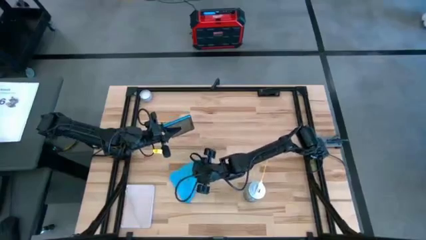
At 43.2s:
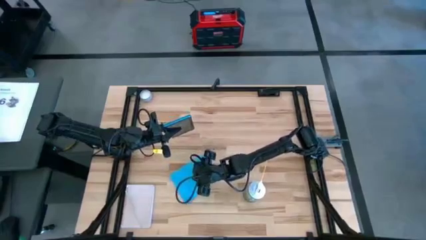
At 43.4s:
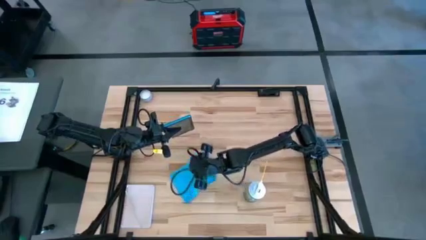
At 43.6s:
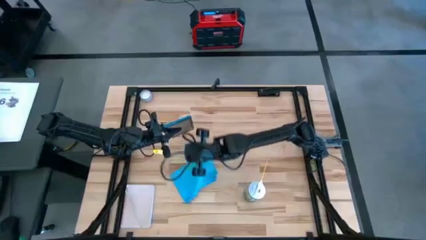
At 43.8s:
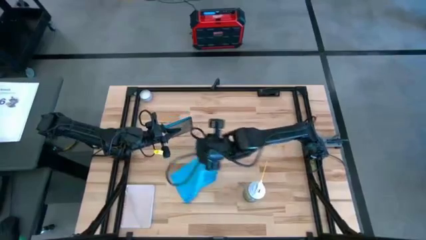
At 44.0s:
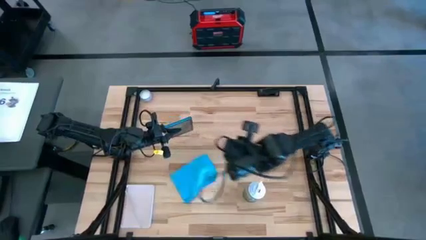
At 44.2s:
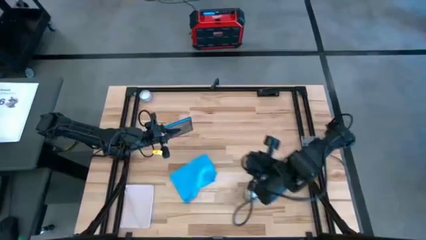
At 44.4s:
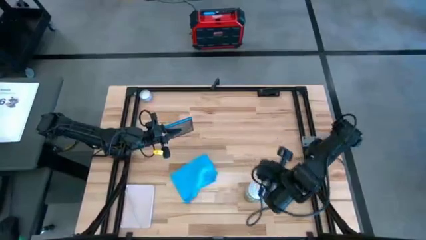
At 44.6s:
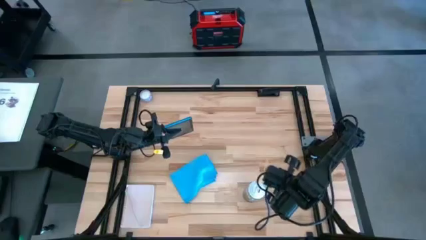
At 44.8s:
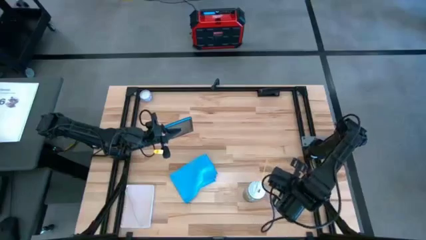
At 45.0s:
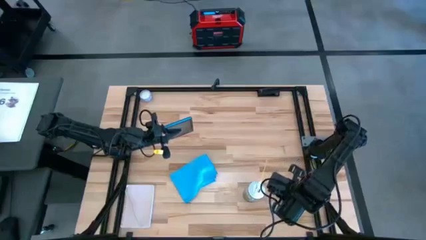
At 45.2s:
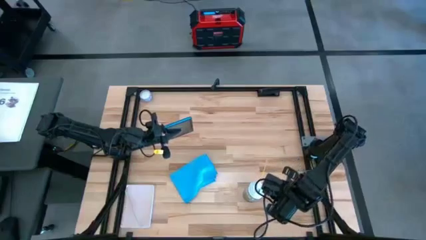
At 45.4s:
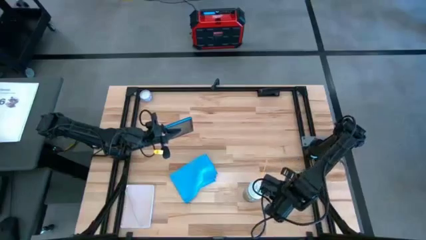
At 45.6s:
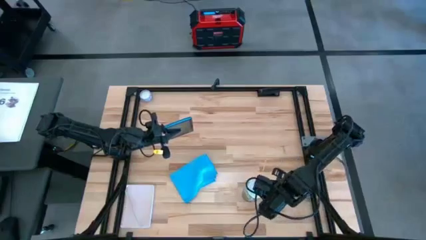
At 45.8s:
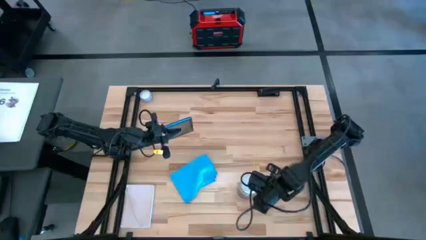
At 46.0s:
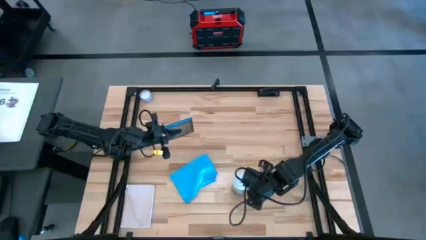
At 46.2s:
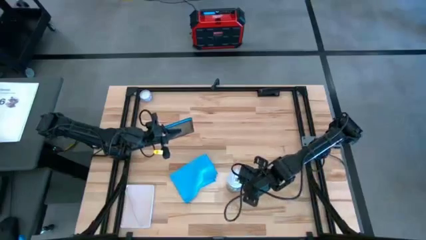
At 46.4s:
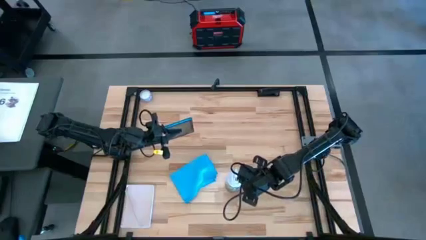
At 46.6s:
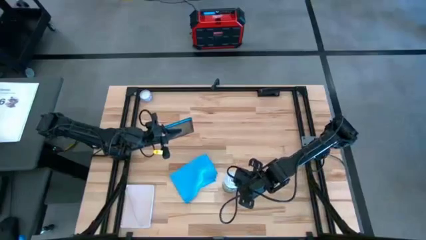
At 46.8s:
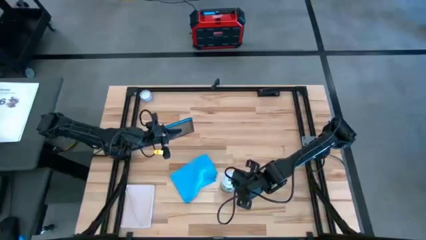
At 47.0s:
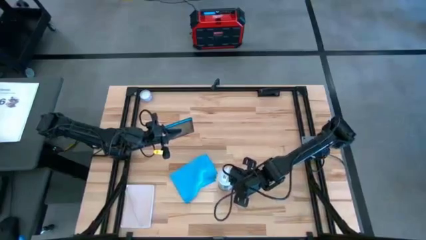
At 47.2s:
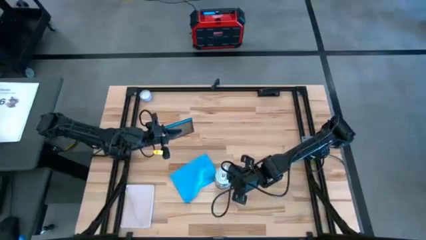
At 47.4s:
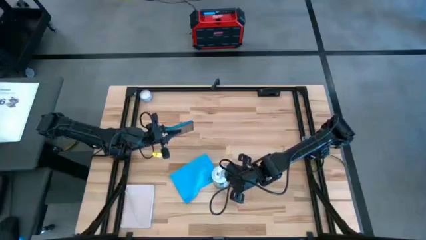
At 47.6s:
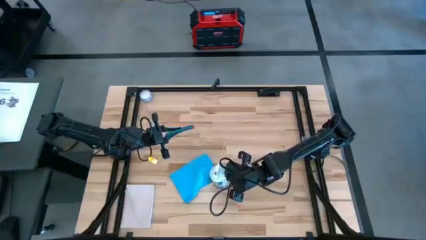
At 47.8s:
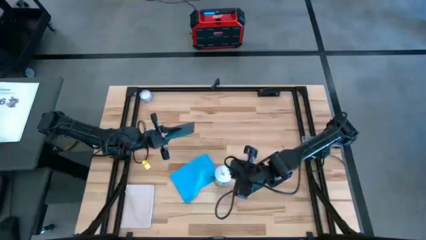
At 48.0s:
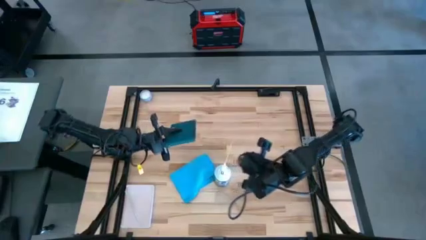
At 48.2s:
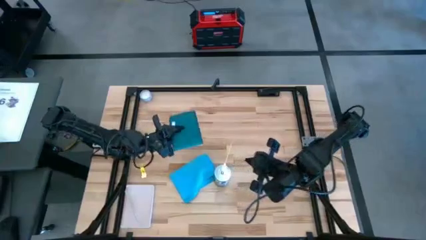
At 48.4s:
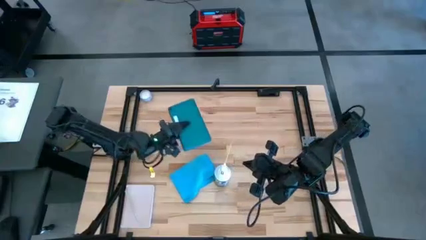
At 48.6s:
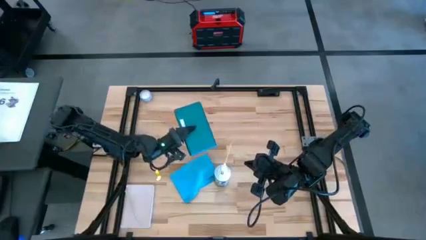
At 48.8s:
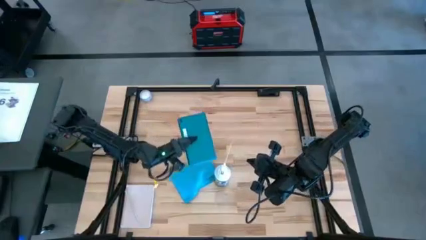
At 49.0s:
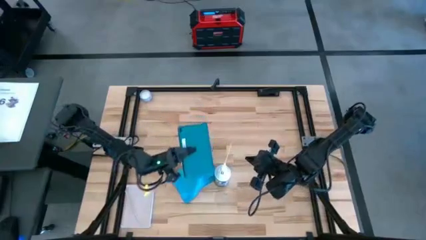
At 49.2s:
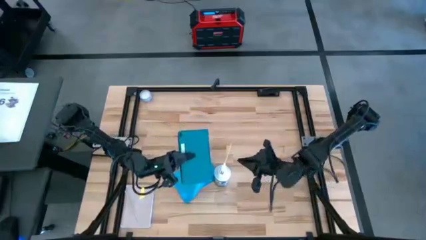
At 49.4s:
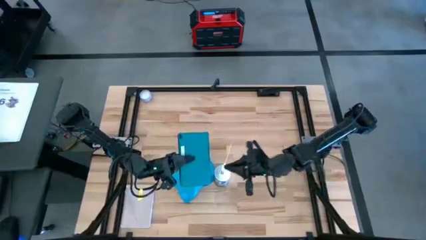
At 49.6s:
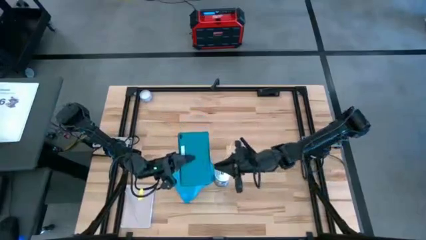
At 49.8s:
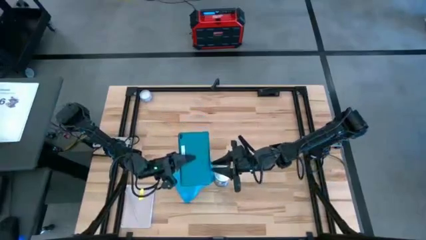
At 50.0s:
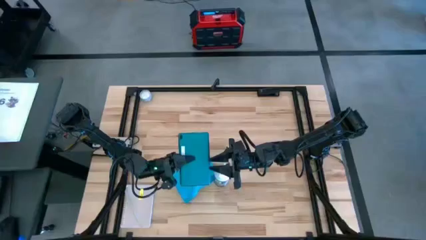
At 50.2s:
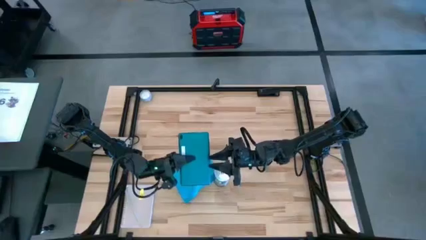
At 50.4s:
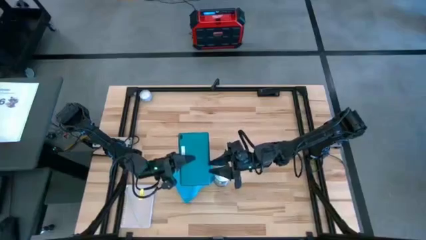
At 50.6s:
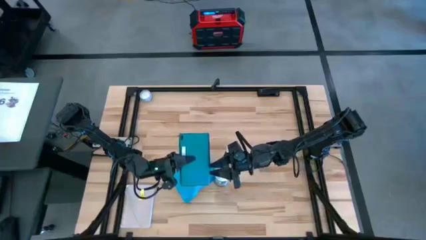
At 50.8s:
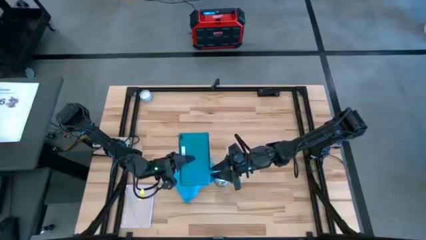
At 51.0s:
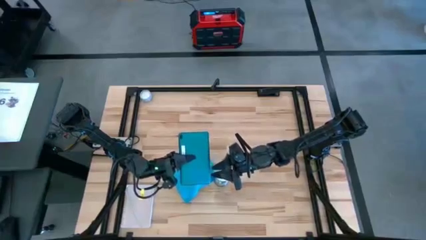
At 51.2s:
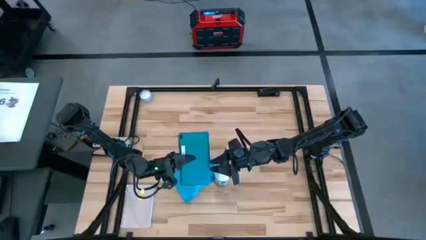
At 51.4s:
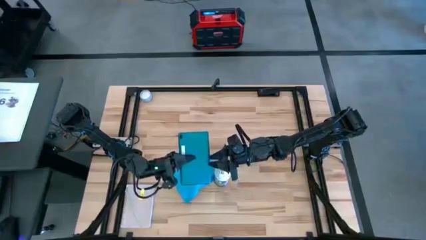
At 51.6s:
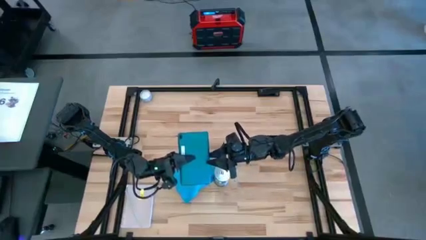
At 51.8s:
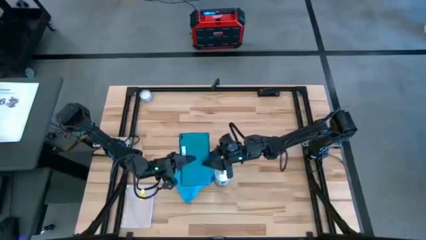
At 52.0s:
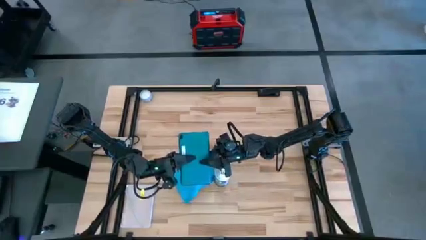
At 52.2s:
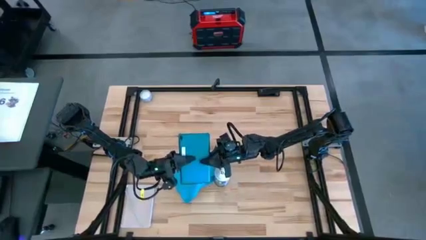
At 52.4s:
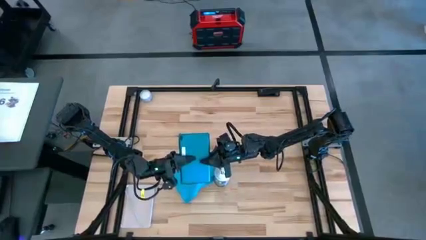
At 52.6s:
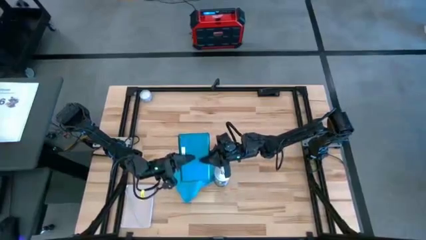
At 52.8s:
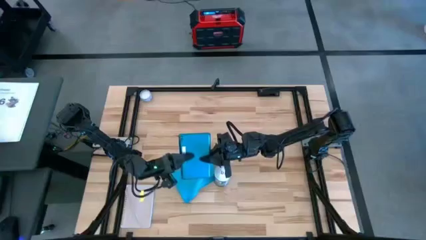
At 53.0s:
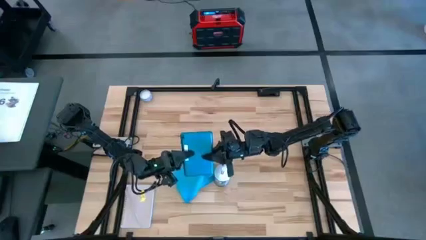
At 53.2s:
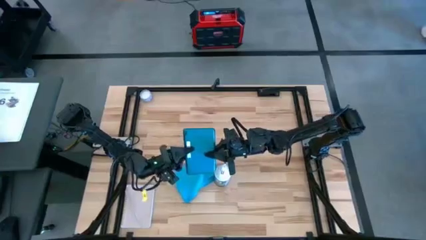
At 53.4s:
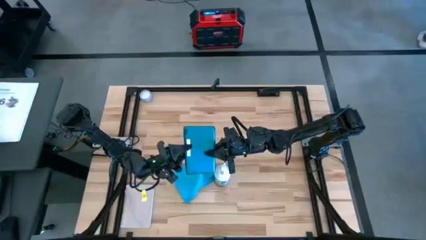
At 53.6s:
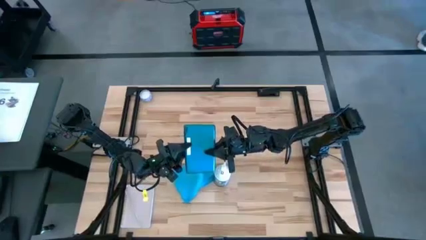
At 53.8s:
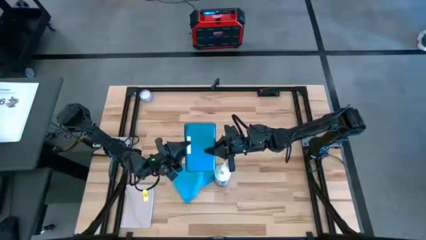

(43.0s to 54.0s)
Task: Apply microfiber cloth
Spray the back of the blue tablet with the spray bottle

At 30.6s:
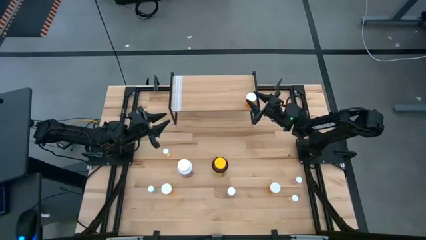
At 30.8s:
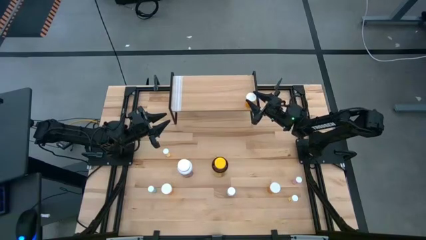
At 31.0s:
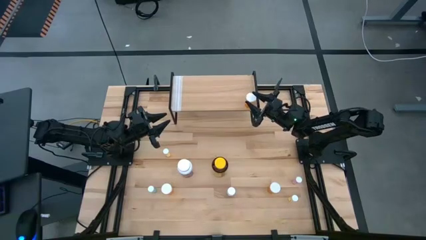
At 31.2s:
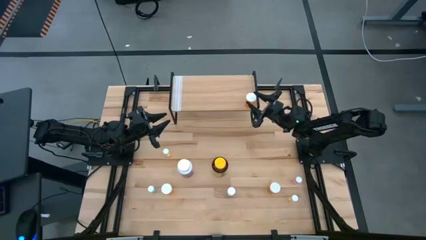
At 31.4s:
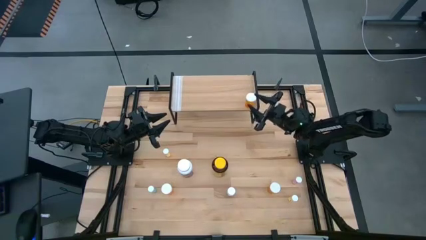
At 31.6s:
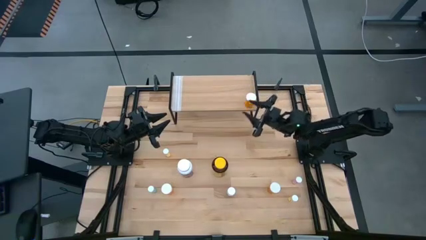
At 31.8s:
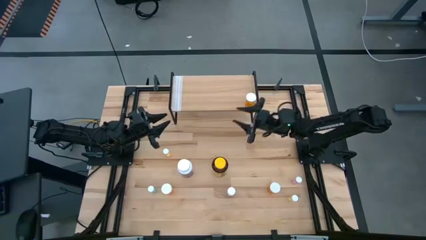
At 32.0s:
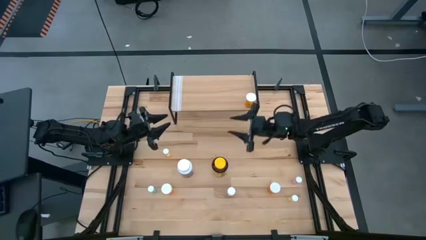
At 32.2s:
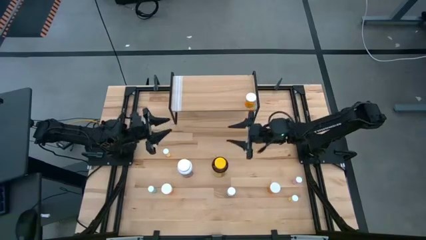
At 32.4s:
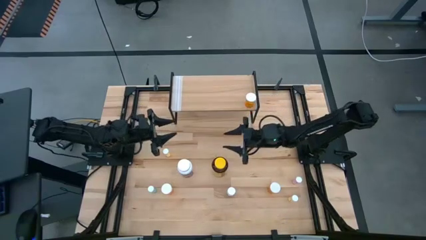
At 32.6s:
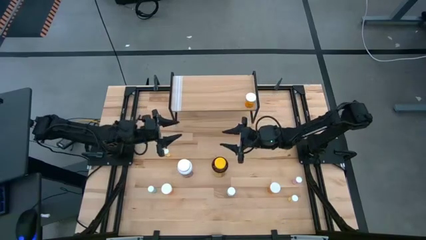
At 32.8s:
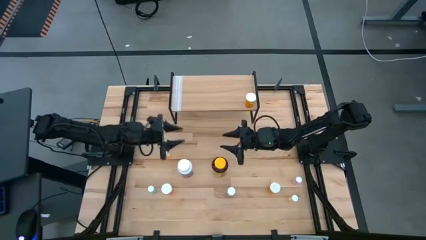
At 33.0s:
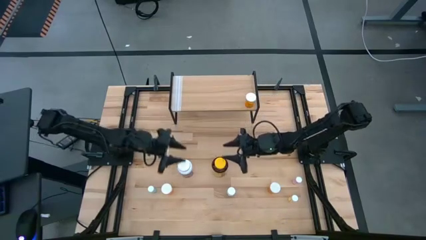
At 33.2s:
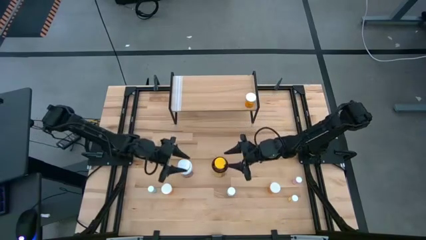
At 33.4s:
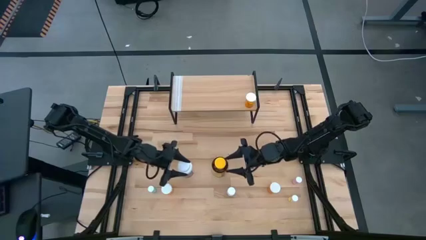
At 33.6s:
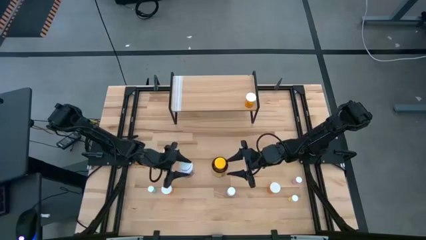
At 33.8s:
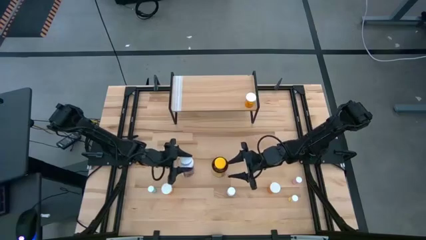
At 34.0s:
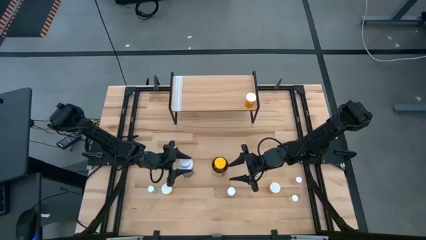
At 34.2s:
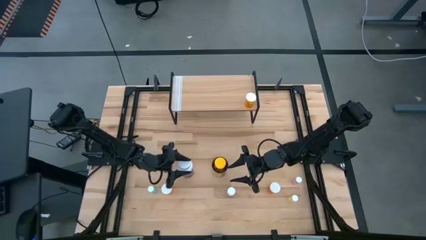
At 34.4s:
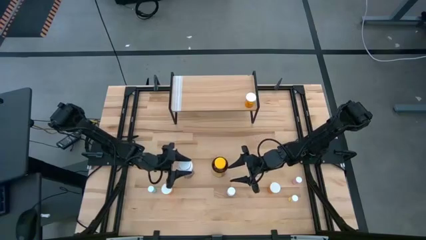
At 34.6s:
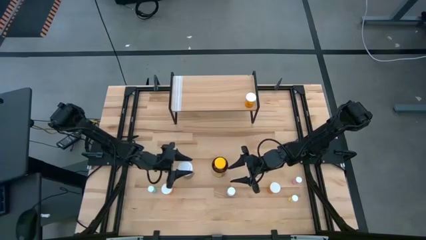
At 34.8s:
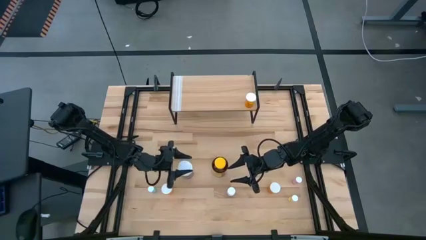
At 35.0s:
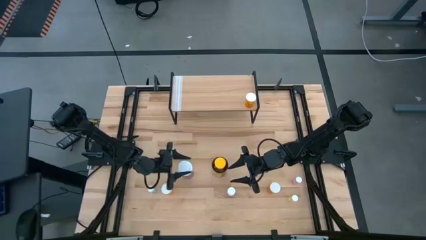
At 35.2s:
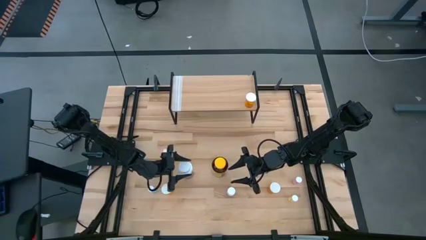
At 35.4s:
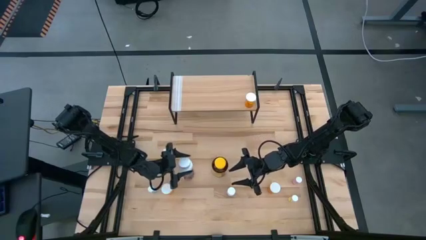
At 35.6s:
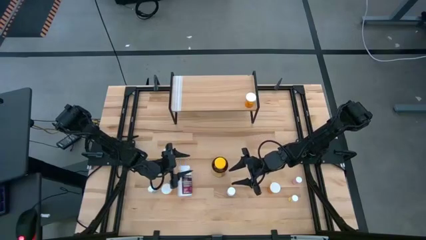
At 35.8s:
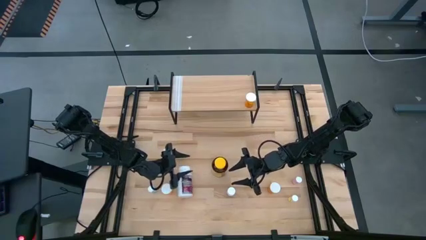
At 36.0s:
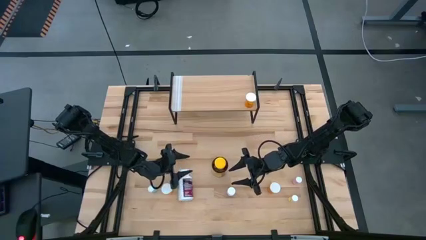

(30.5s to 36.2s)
Task: Pick and place medicine bottles onto shelf by color
Put the big white medicine bottle on the shelf
